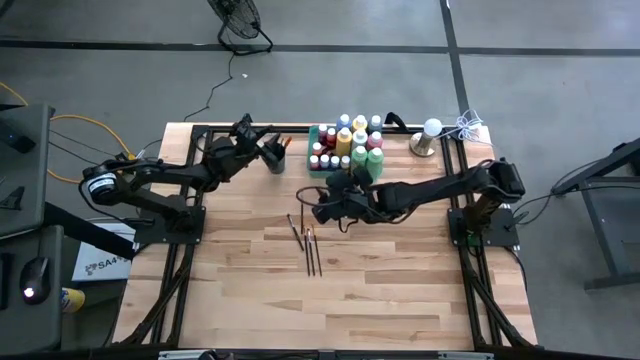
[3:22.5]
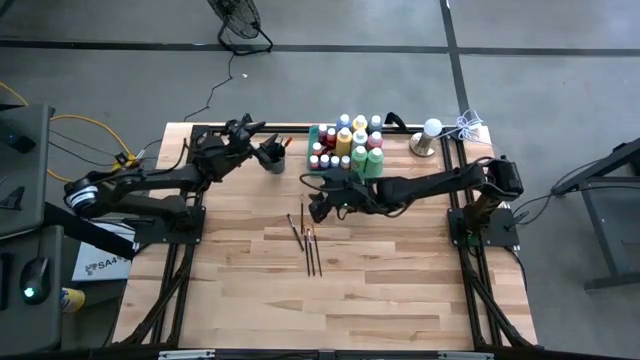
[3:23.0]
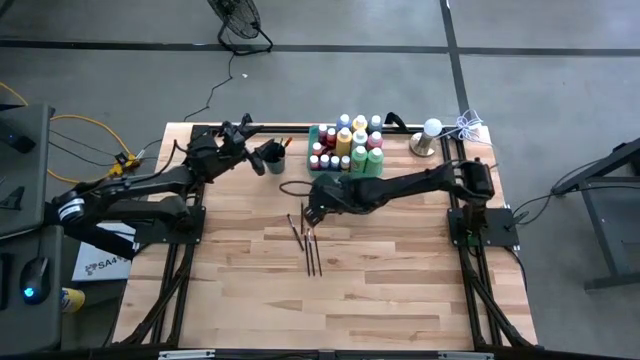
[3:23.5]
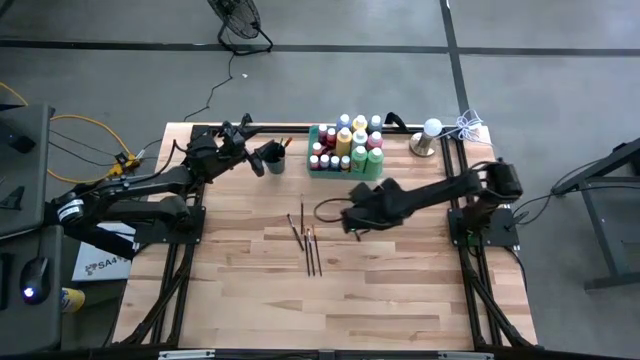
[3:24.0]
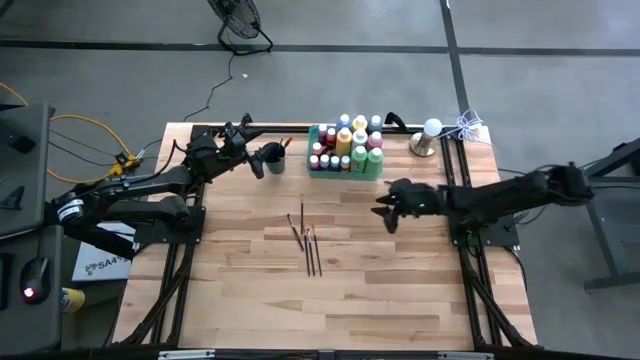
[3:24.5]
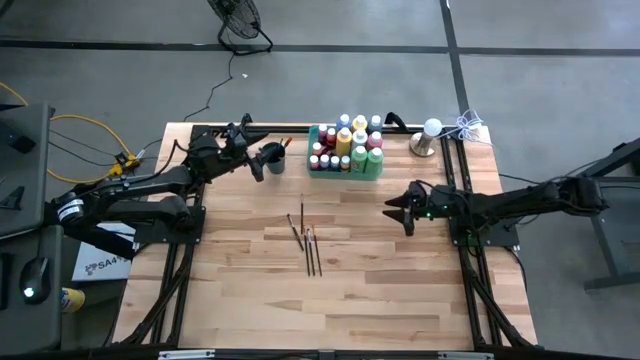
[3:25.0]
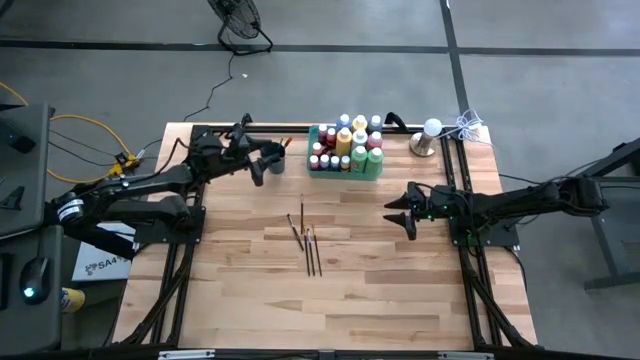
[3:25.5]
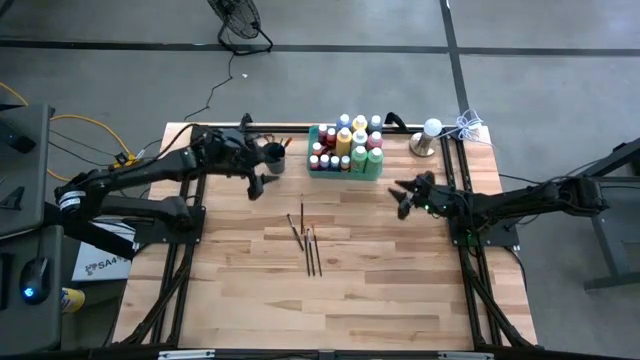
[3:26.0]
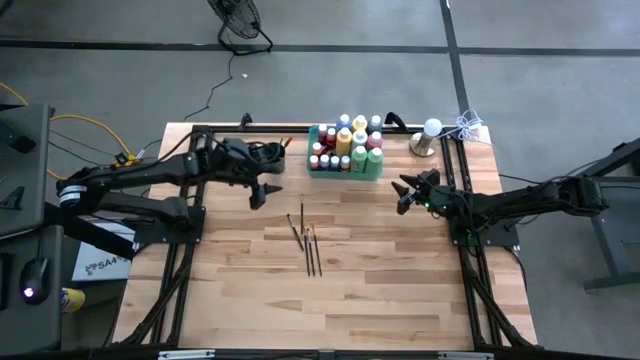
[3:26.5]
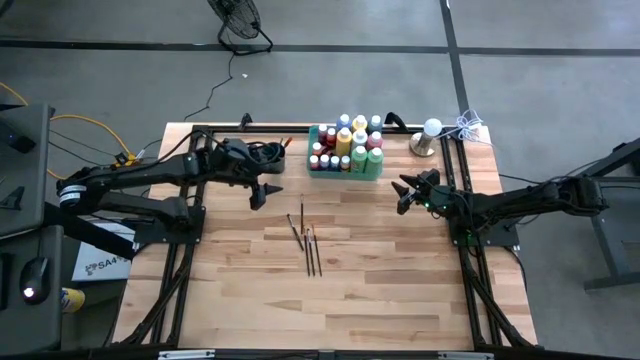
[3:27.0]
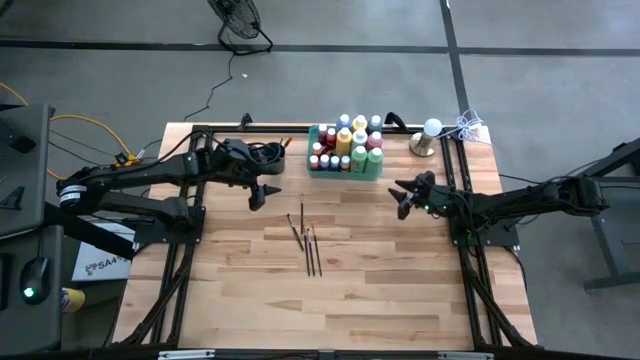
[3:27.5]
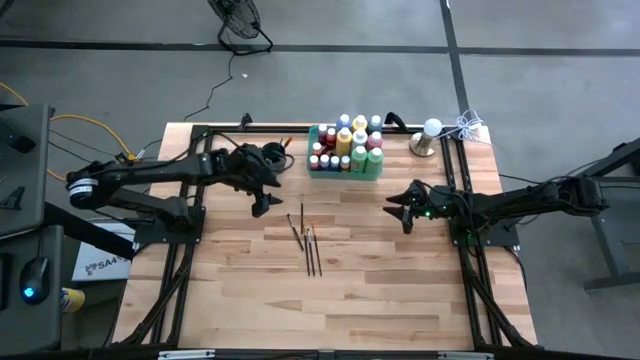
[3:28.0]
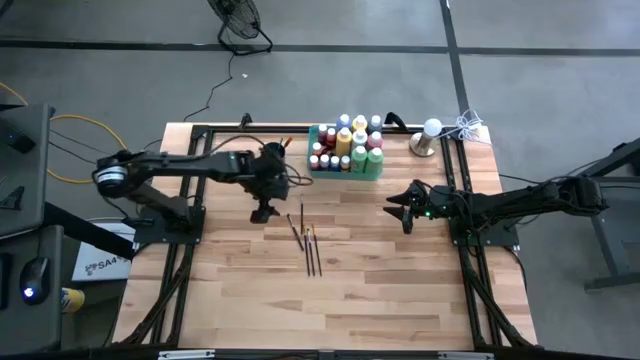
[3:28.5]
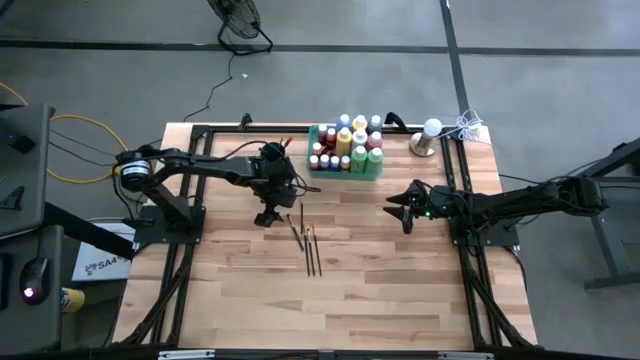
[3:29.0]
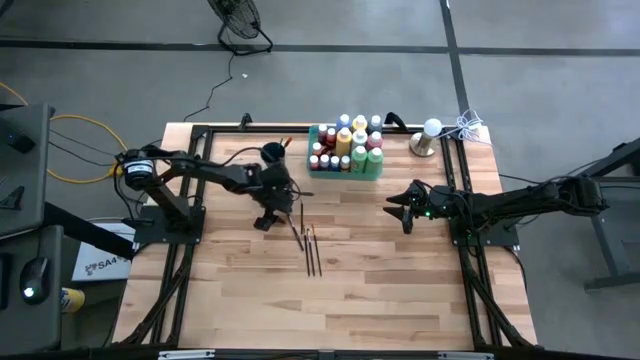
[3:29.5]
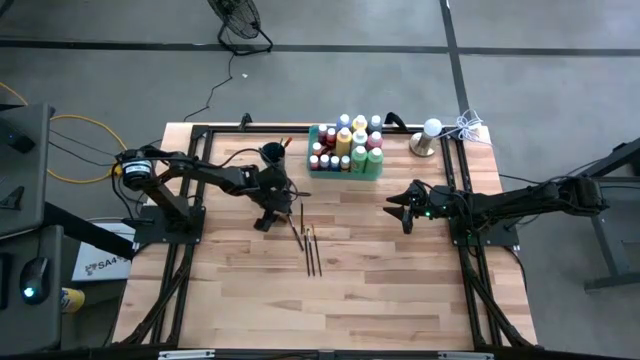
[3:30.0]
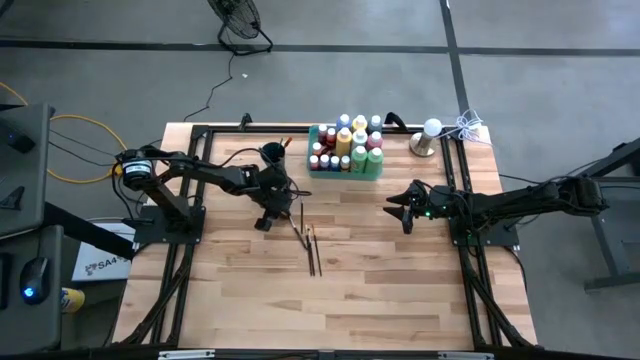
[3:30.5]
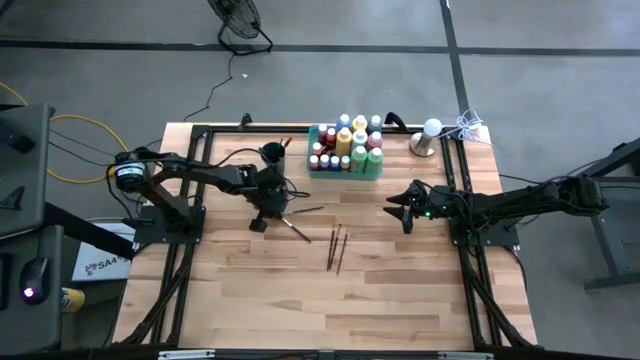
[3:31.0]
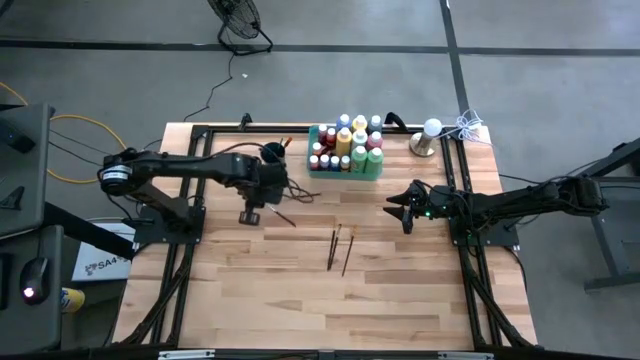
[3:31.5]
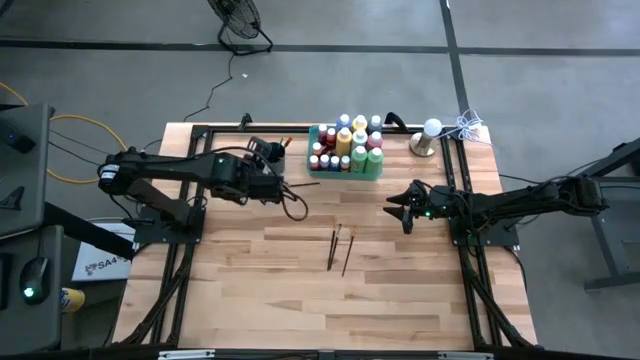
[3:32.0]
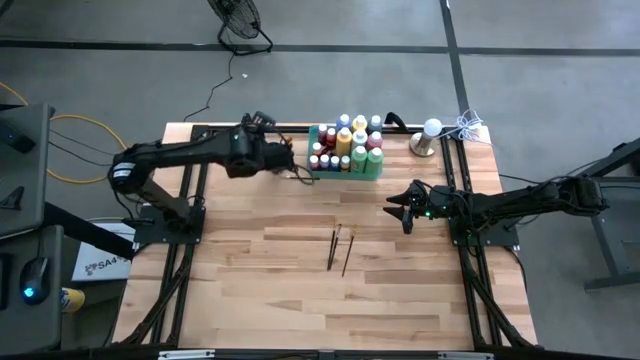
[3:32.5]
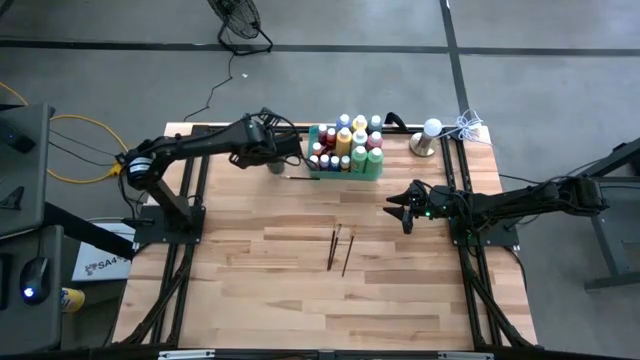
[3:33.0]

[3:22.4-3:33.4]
Task: Pick & Place Paint Supplies
Put the silver black paint brush into the blue cup

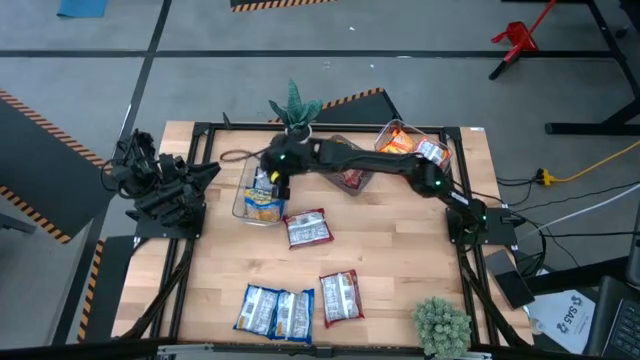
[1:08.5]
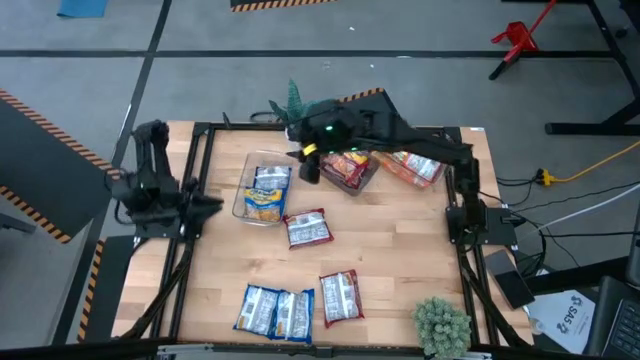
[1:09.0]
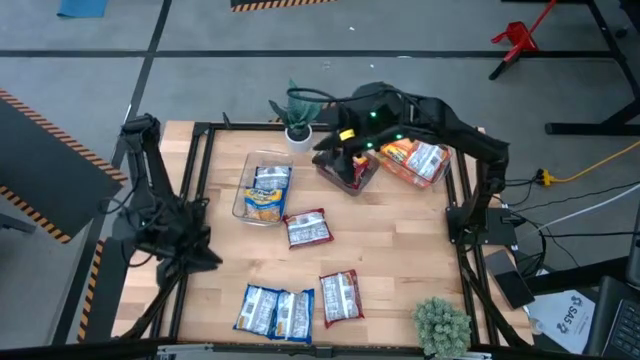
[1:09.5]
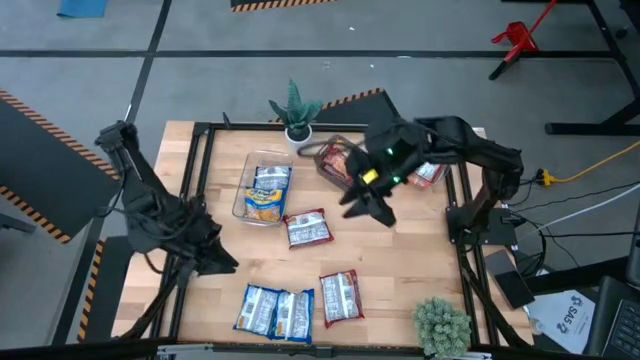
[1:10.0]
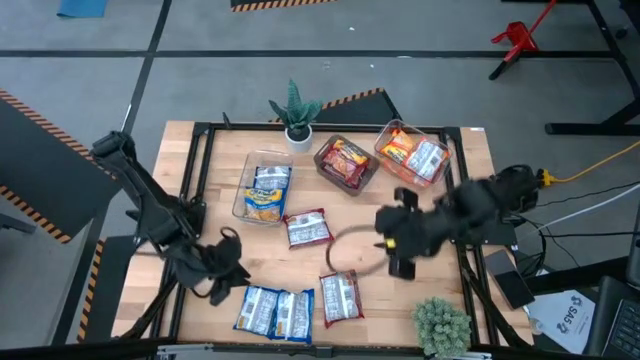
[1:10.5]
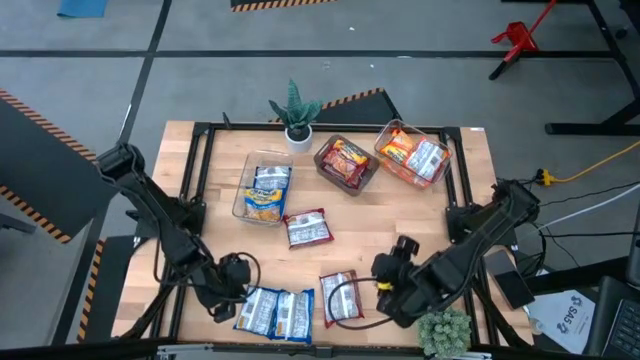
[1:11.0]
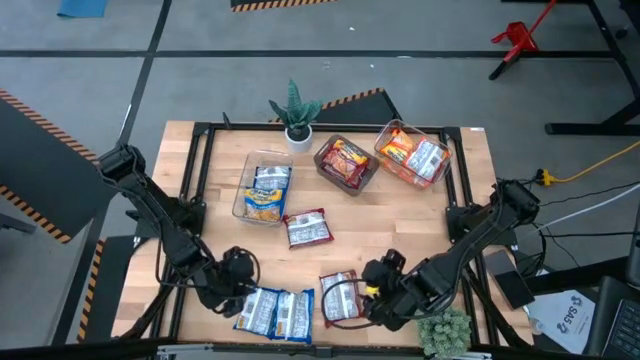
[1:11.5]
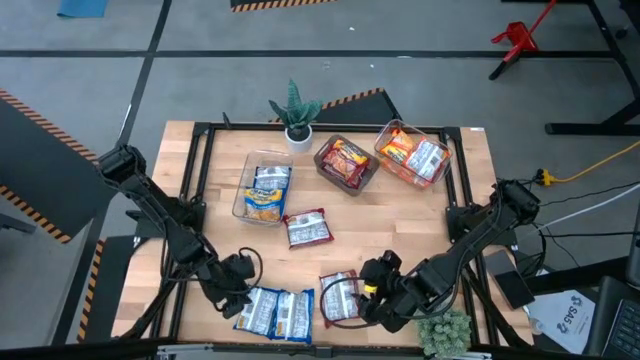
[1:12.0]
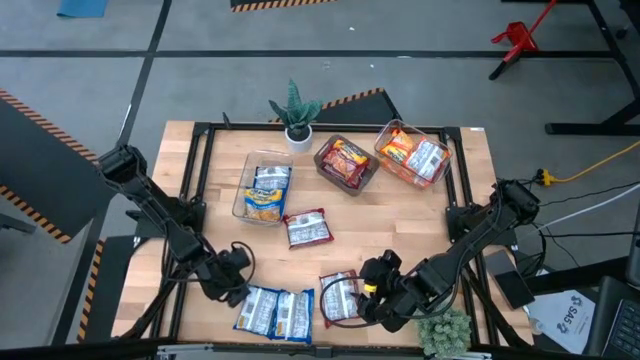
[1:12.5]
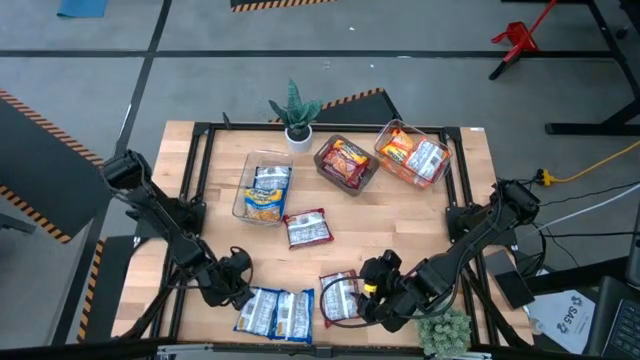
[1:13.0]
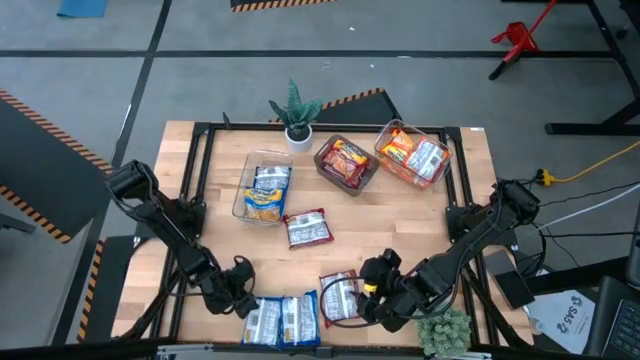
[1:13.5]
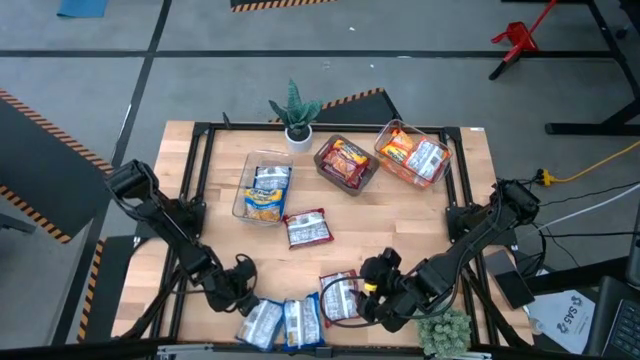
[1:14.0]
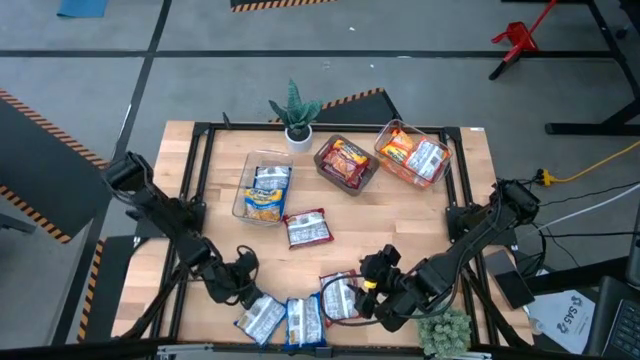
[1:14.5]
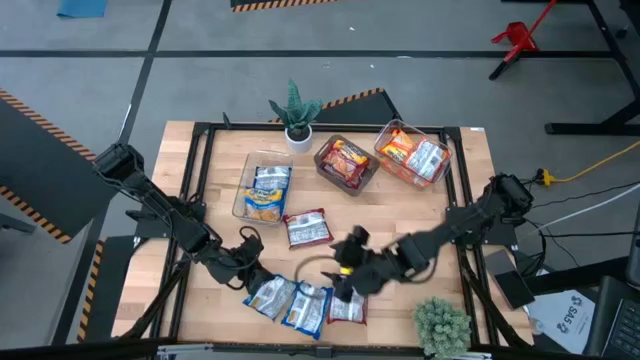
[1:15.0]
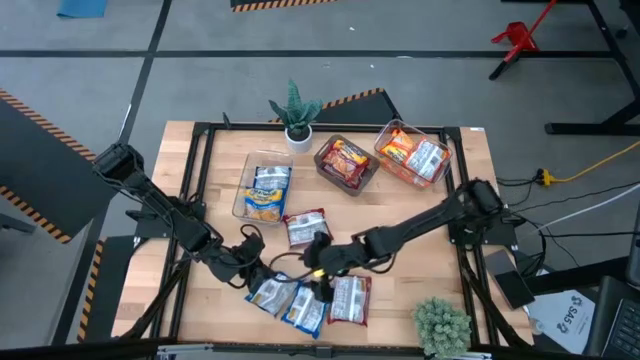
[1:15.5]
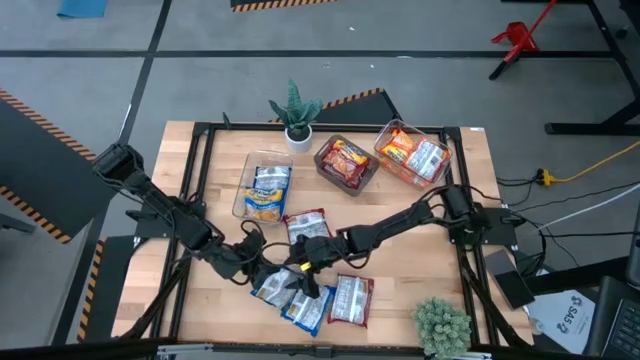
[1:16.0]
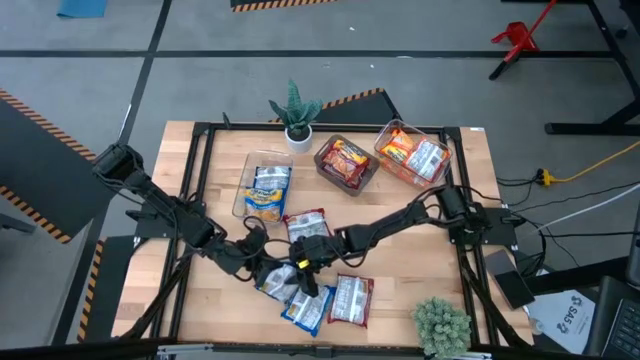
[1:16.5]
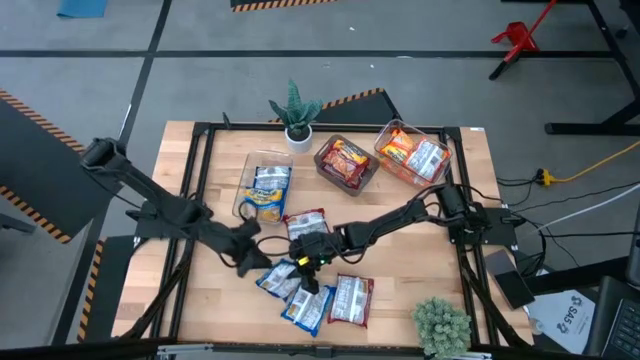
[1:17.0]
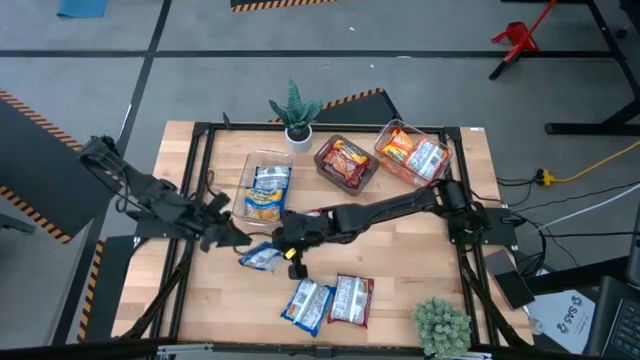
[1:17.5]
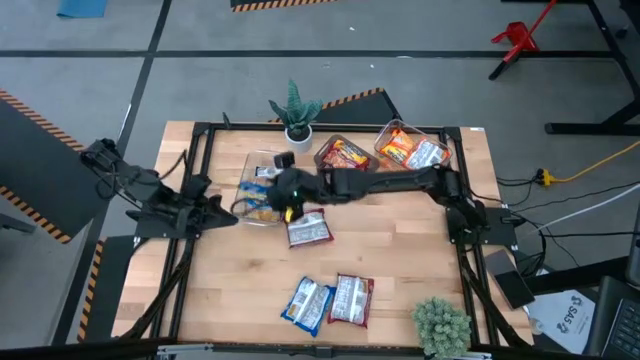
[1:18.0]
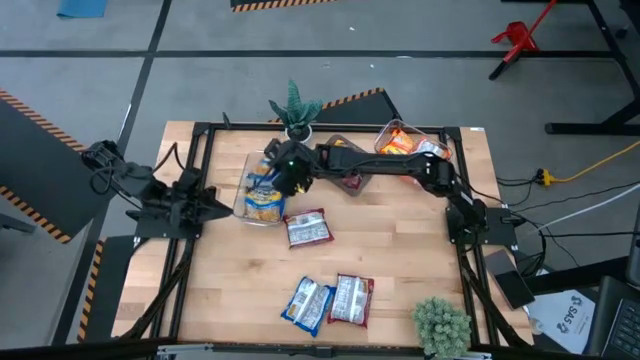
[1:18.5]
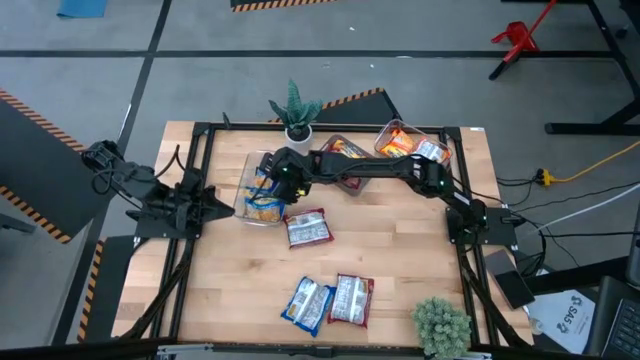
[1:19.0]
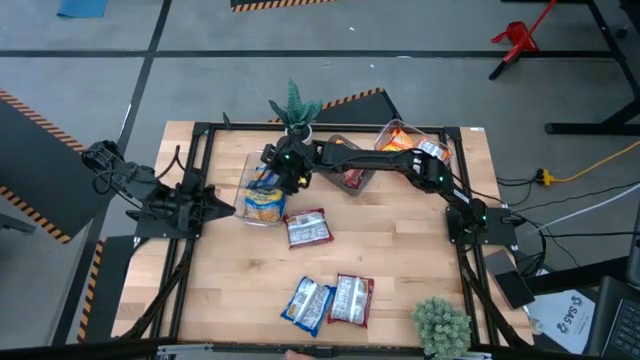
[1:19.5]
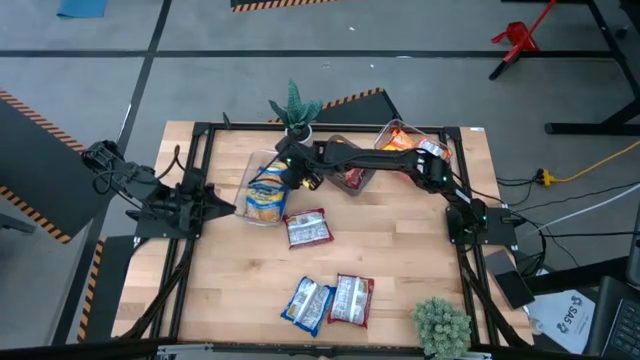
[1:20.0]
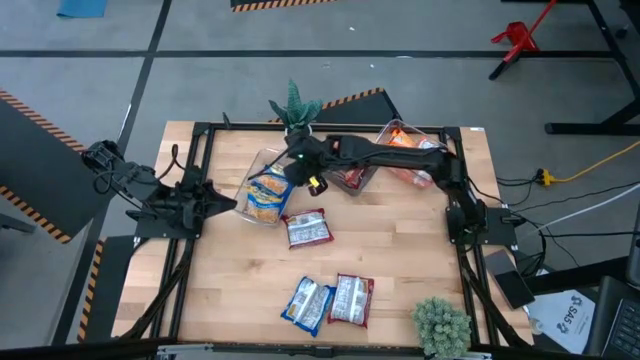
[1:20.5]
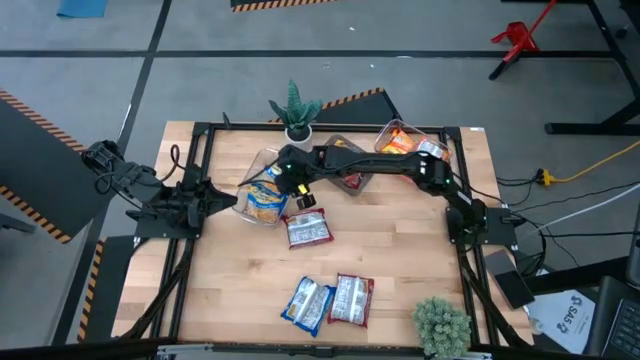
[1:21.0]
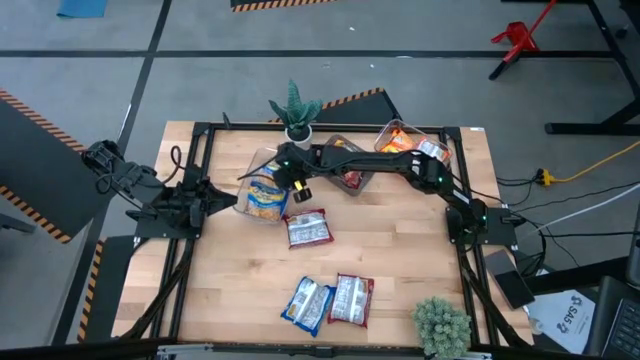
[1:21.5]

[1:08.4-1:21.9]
Task: Sort Maruchan noodles
Put the blue noodle pack into the left transparent bin
